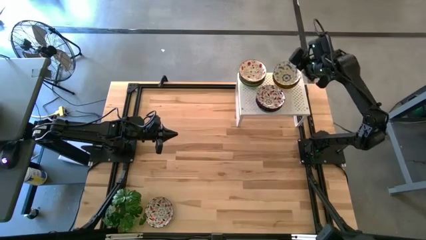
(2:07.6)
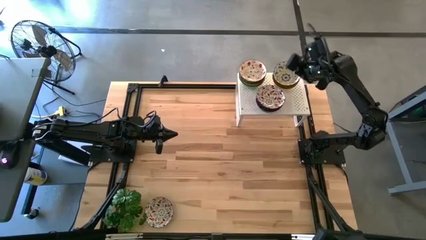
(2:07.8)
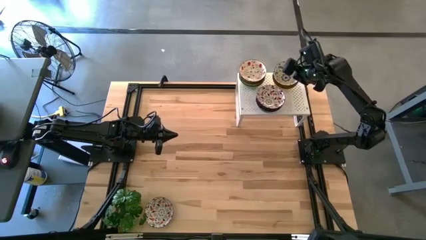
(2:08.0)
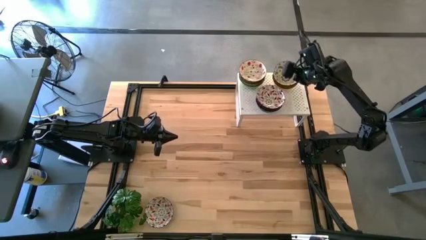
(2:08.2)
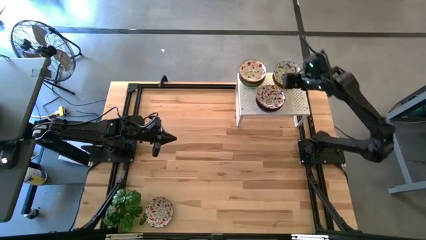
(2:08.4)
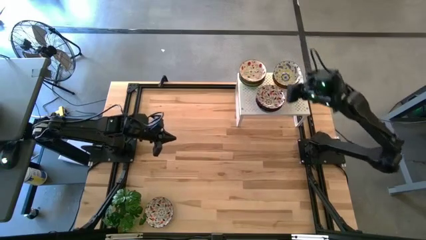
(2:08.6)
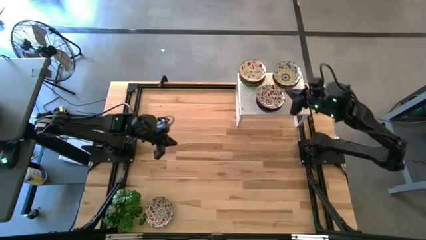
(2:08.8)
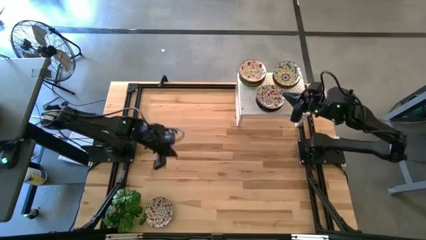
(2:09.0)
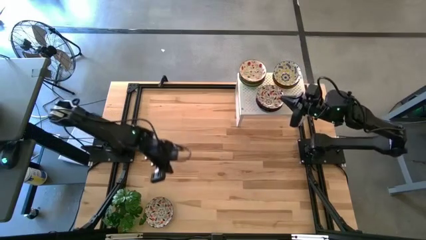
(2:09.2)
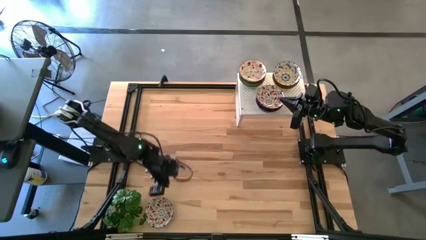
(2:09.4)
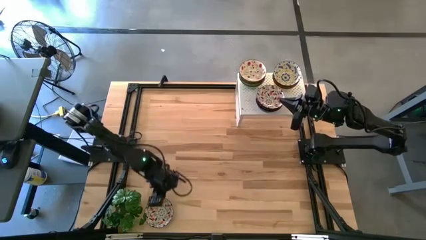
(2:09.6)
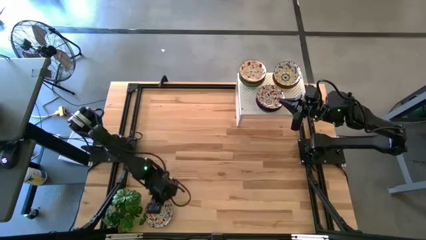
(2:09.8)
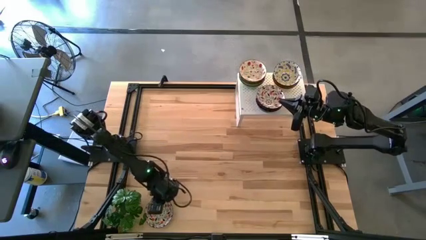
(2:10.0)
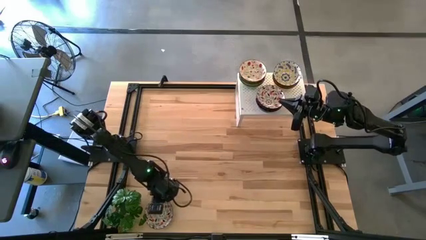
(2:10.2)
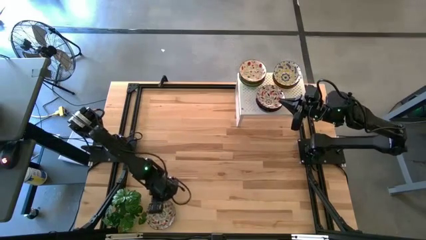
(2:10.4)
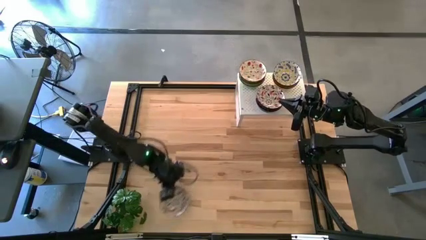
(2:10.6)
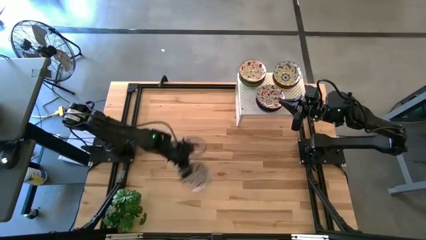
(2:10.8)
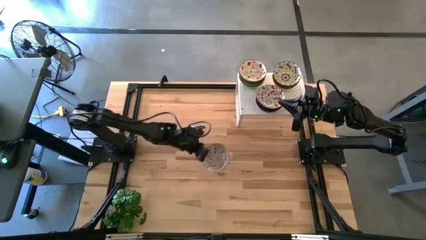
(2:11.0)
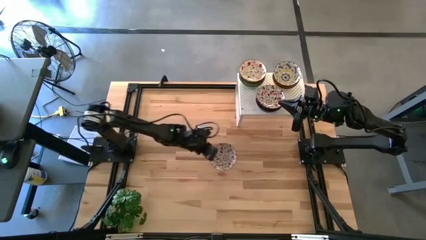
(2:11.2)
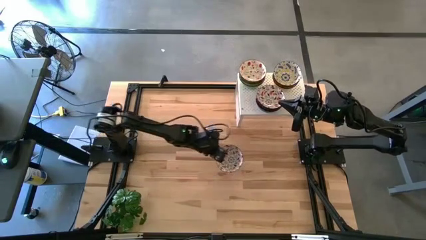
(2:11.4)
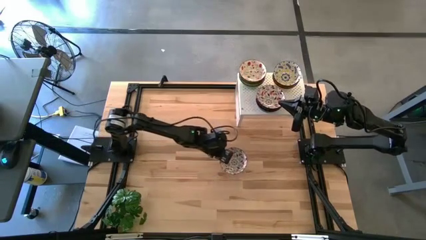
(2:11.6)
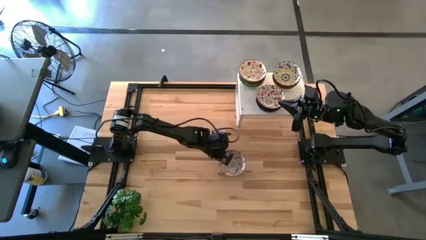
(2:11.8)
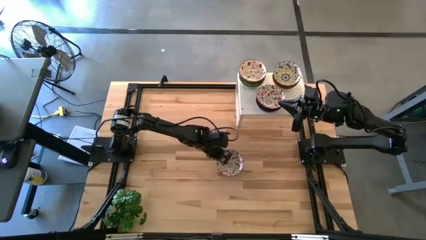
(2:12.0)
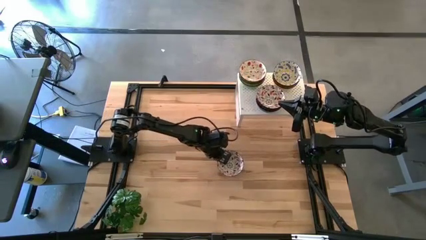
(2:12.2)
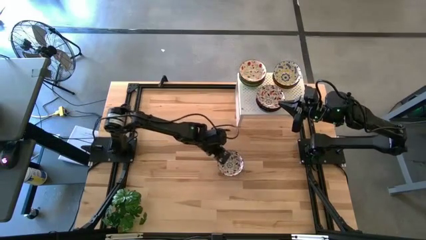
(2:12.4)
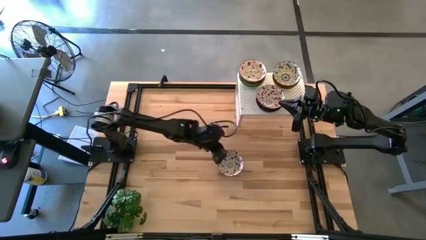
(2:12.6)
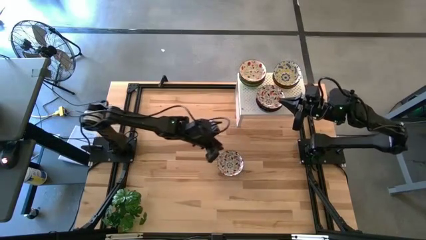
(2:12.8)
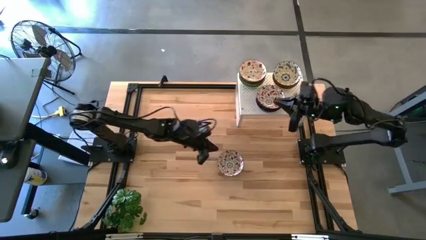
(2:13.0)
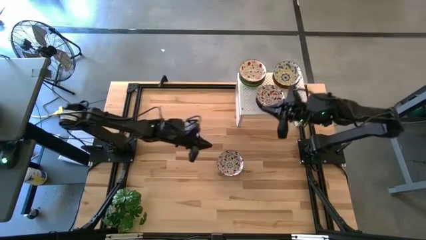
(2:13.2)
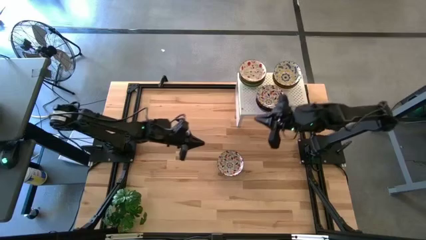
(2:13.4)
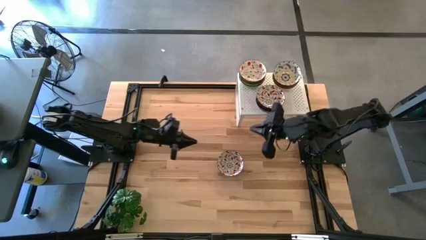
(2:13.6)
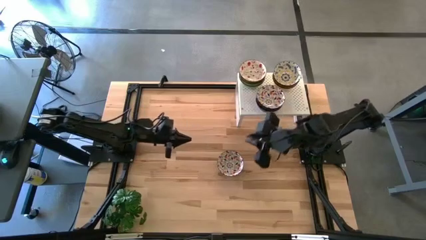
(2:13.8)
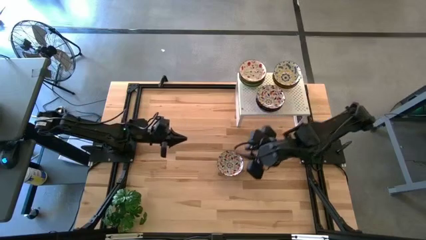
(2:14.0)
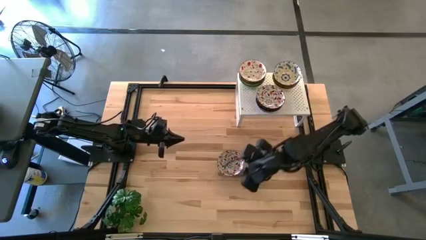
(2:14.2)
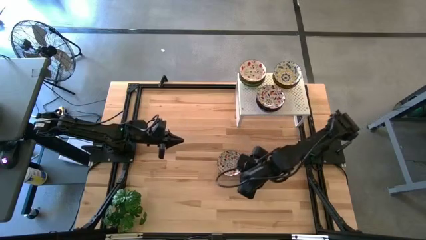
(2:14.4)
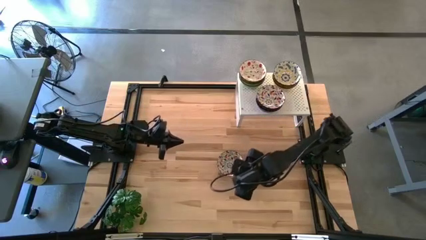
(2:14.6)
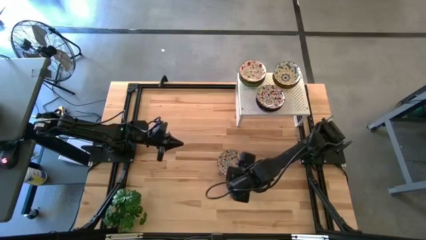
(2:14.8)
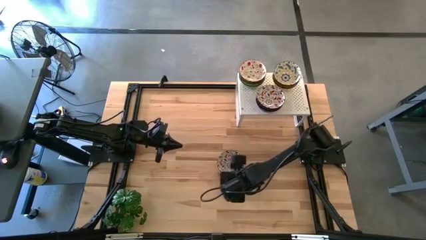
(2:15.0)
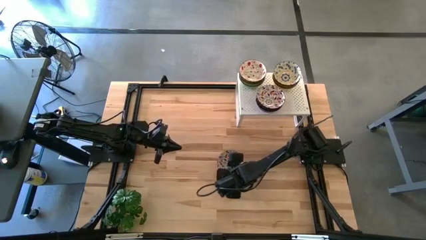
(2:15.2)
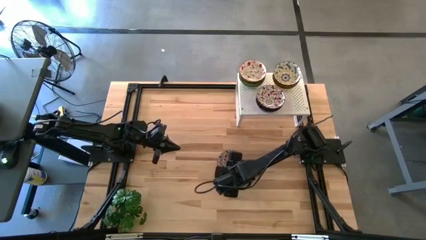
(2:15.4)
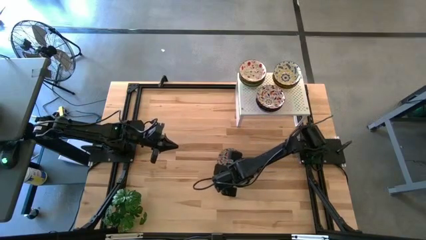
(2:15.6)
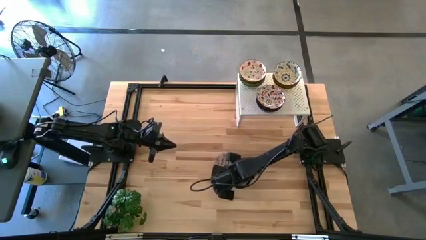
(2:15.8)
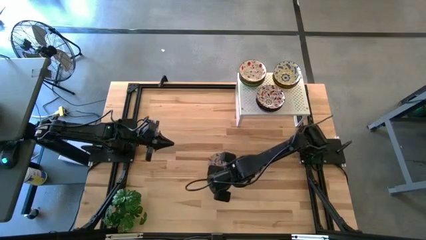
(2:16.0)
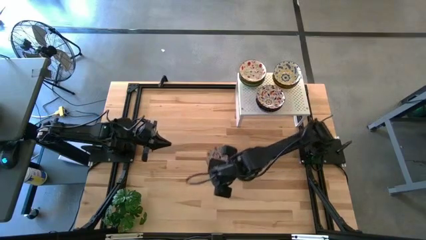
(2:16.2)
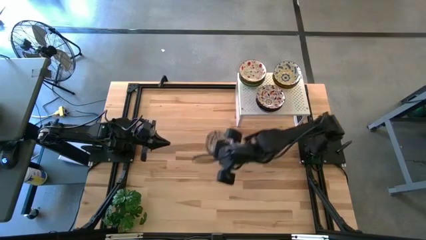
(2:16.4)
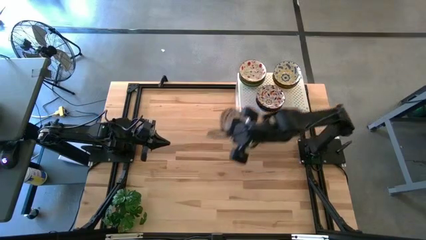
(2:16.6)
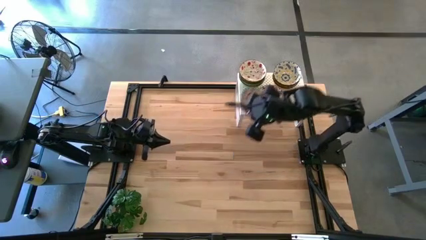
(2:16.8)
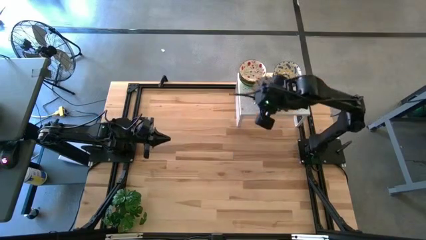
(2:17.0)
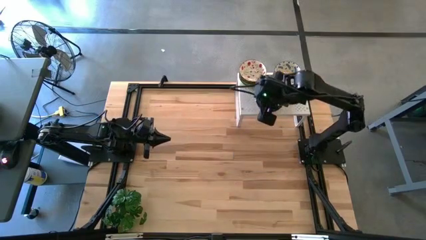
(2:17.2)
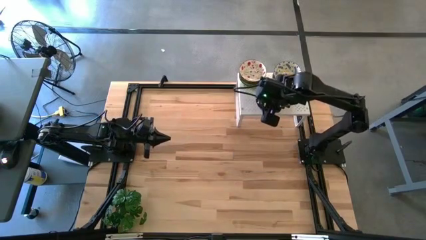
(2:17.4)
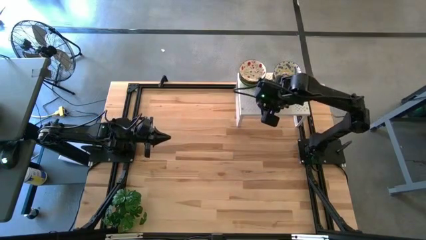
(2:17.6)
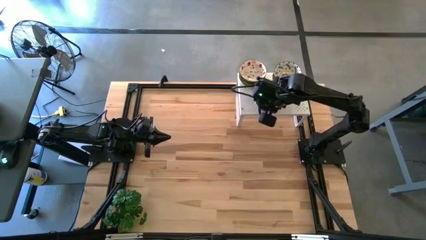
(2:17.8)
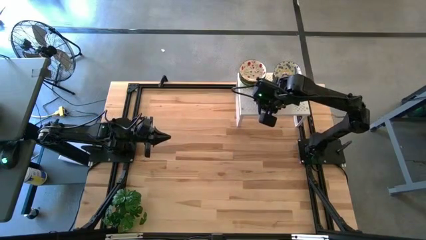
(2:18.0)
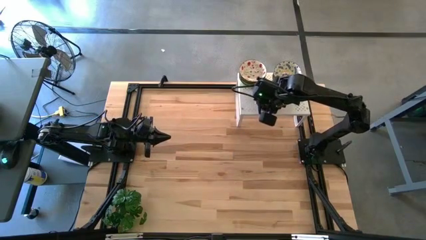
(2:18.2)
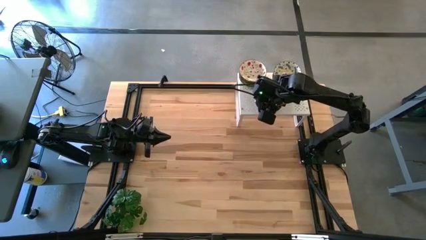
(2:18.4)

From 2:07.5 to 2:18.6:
Task: Pick & Place Mini bowls
Stack the black patterned bowl on top of the black patterned bowl on the shelf

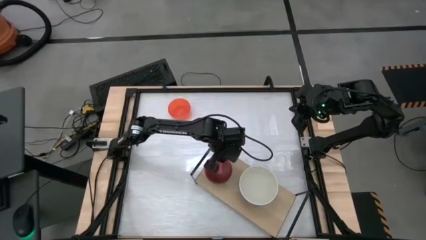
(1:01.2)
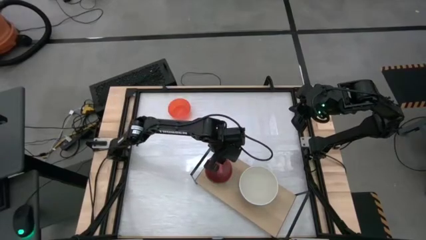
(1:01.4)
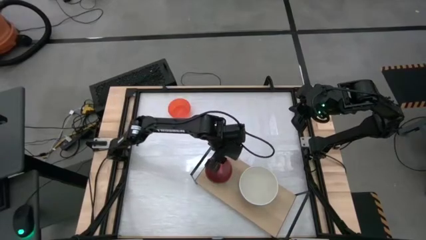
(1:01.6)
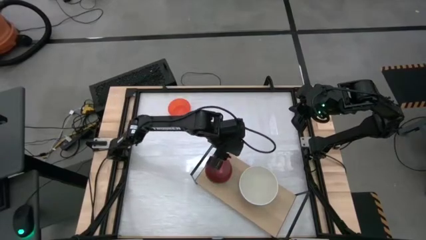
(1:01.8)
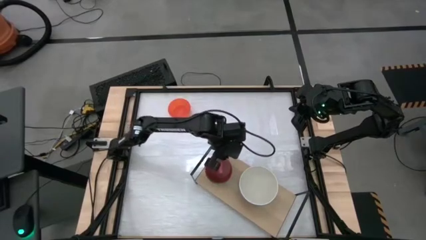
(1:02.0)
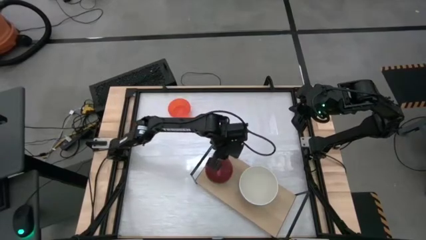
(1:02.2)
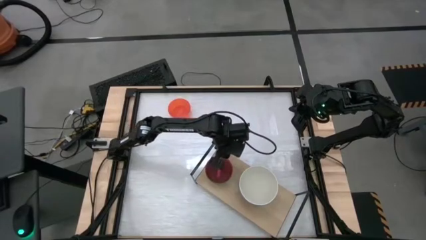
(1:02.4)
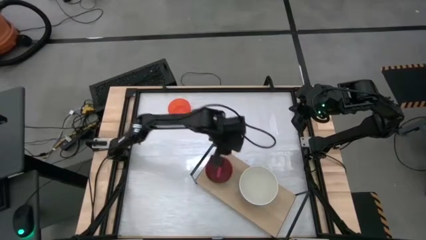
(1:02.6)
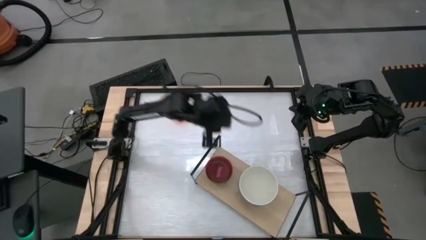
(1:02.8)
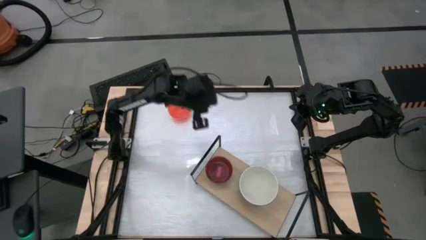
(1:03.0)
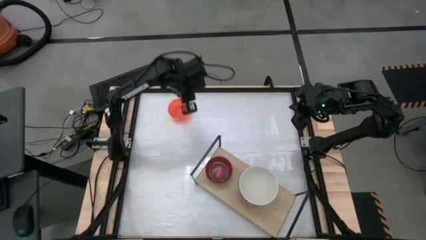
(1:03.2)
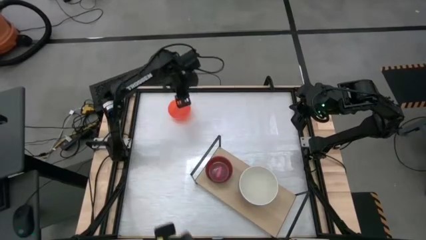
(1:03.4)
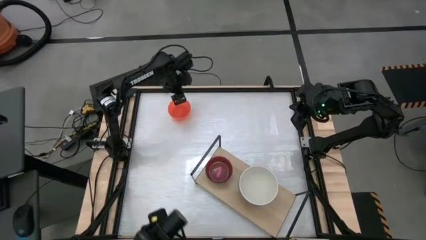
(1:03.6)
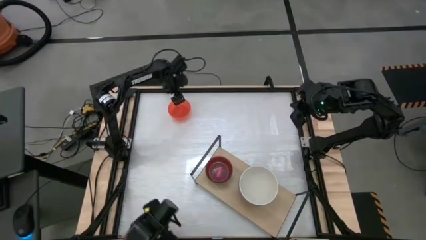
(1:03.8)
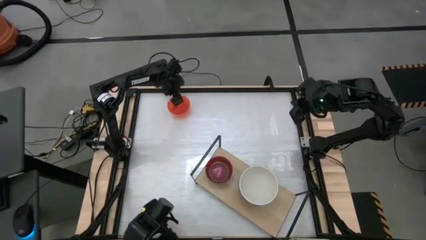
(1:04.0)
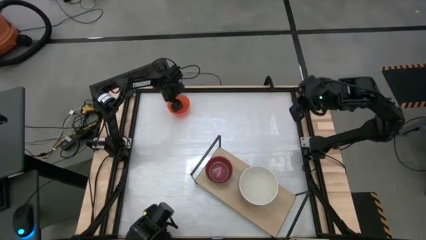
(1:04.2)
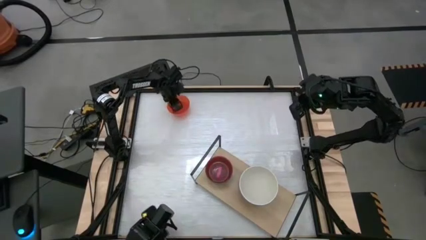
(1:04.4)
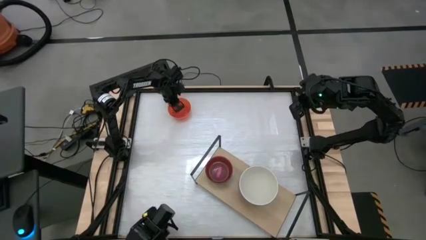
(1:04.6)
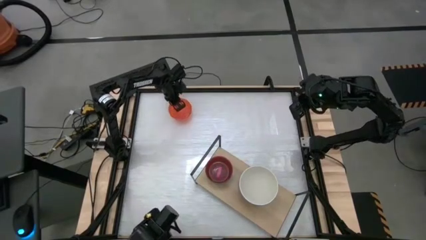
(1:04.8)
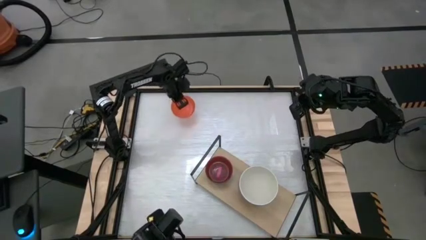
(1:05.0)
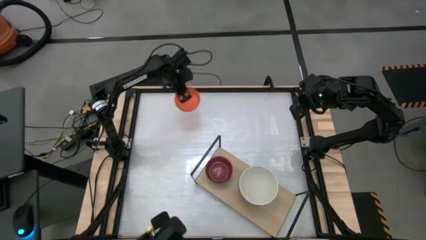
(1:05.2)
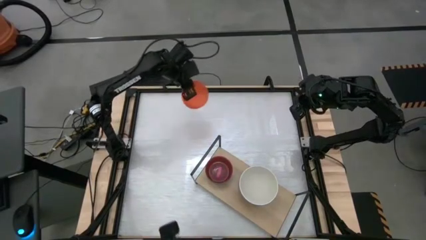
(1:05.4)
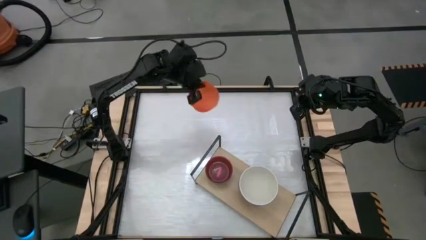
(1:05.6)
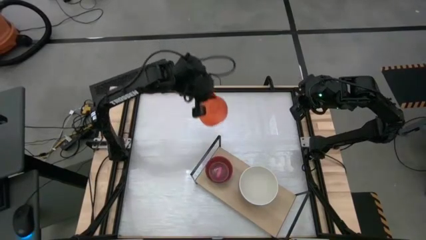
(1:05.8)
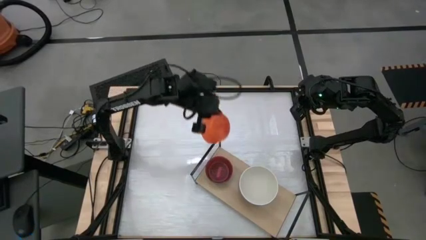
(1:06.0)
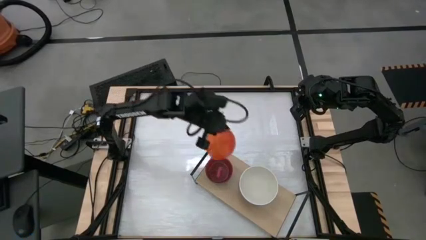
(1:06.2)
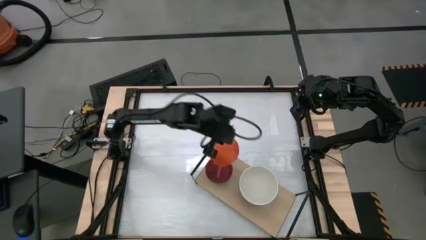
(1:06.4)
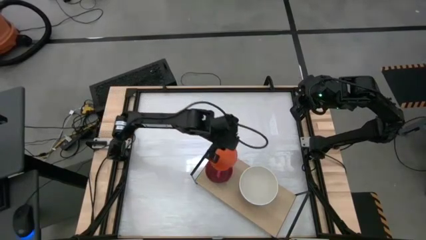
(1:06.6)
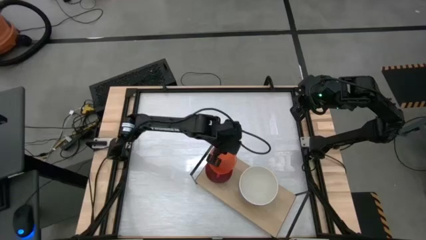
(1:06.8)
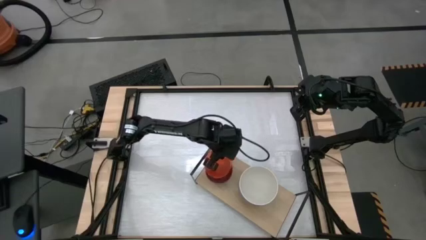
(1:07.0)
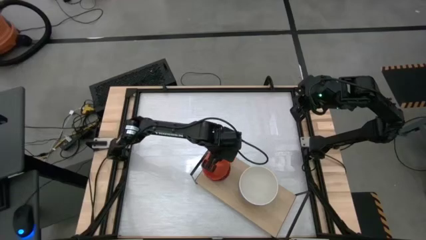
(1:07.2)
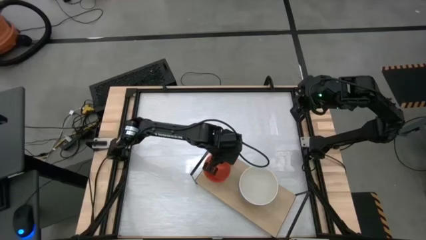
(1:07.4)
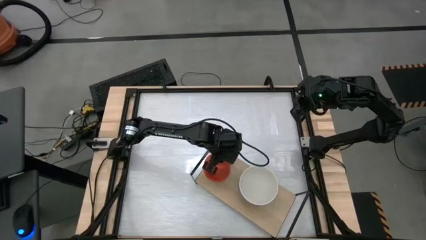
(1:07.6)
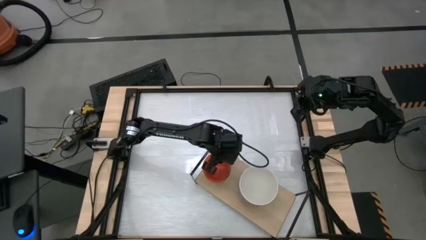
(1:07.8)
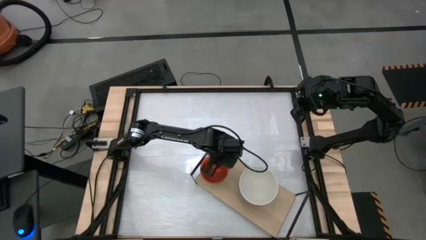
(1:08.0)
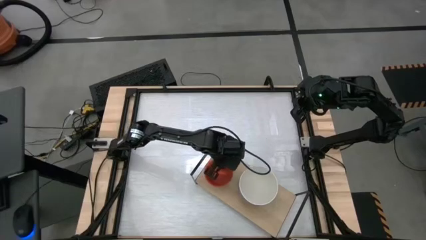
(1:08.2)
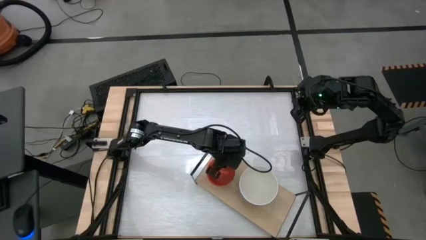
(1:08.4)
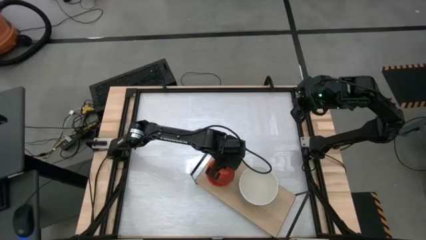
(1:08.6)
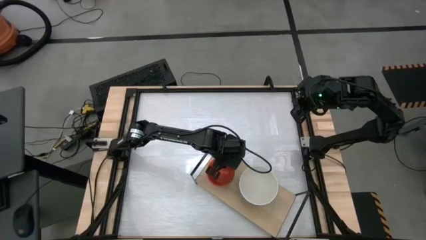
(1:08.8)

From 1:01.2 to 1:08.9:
Task: Place and stack bowls onto a shelf
Stack the small orange bowl on the small pink bowl on the shelf
